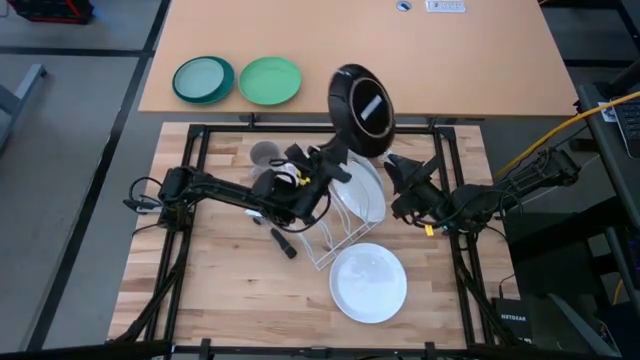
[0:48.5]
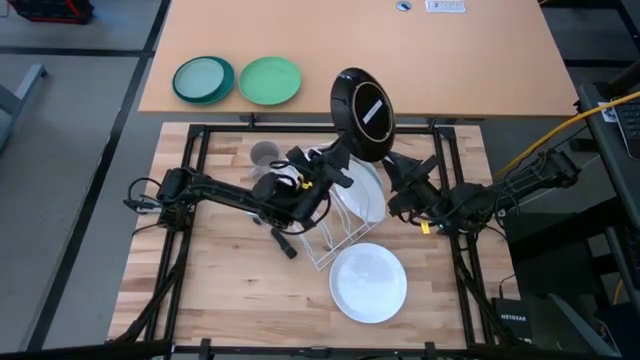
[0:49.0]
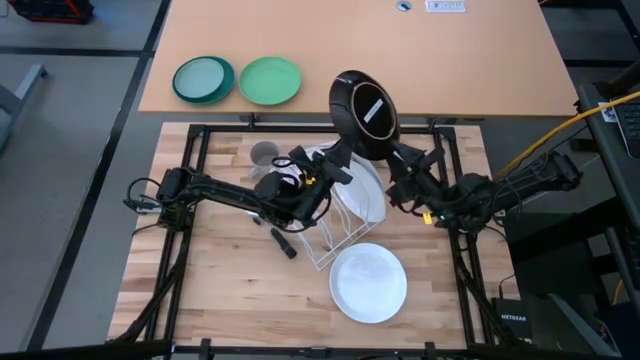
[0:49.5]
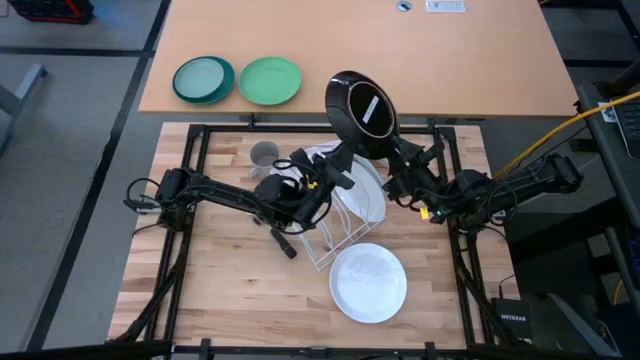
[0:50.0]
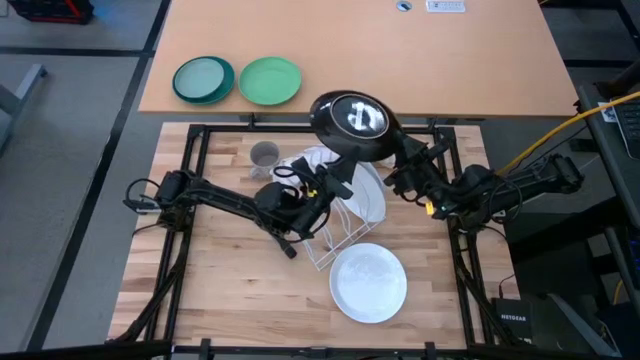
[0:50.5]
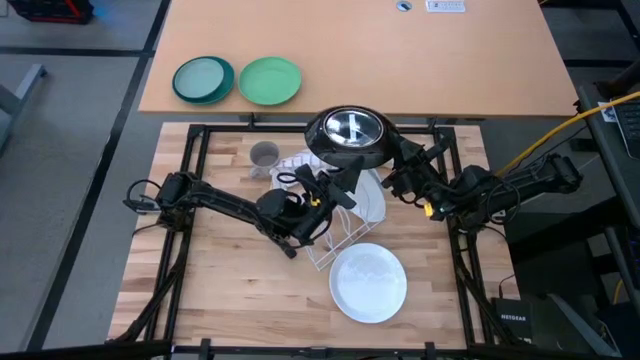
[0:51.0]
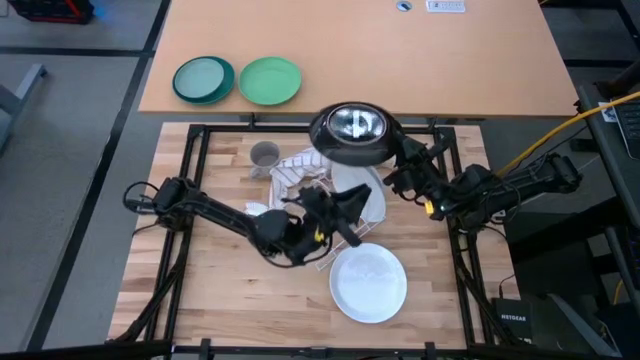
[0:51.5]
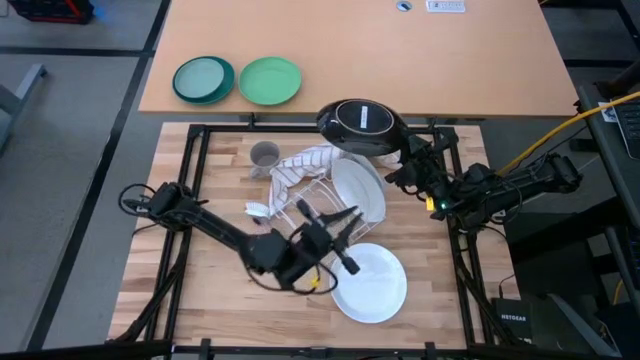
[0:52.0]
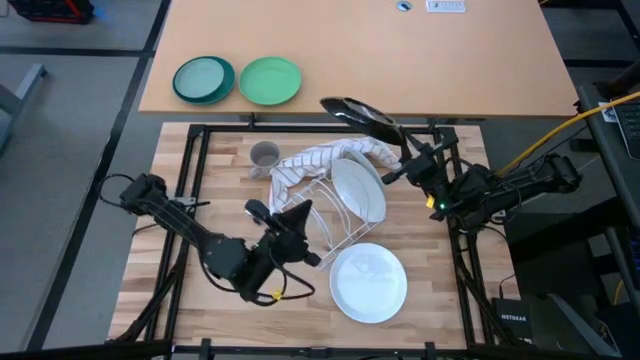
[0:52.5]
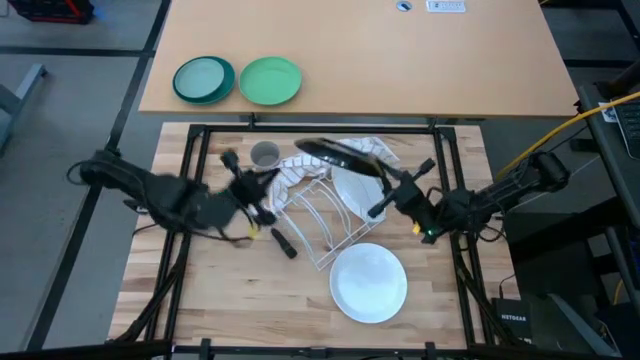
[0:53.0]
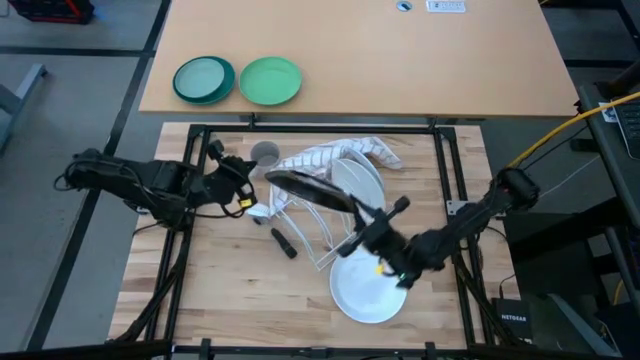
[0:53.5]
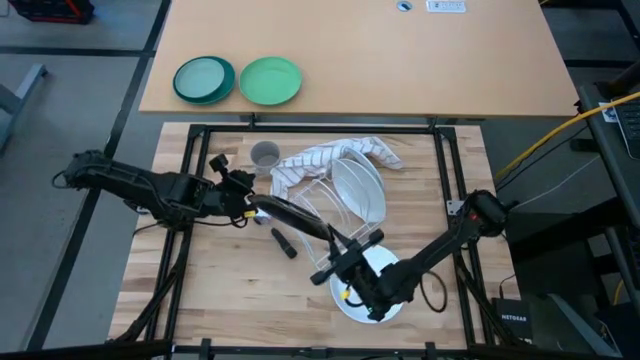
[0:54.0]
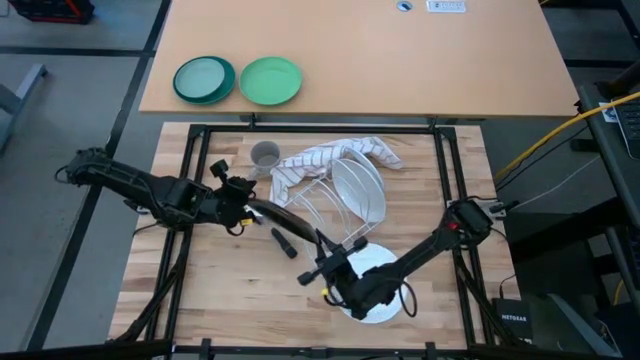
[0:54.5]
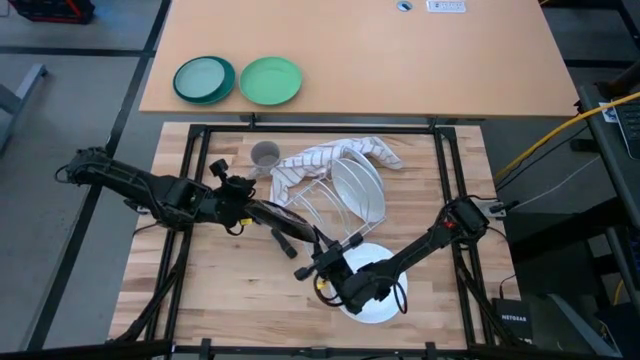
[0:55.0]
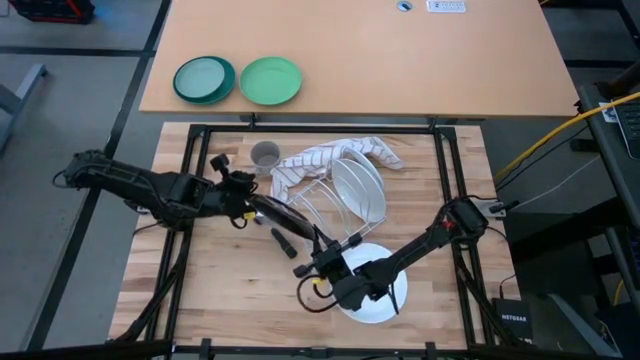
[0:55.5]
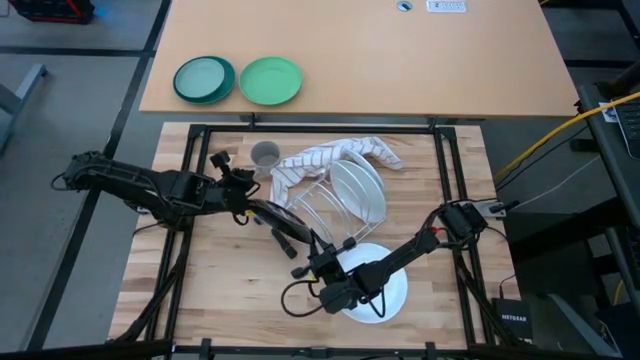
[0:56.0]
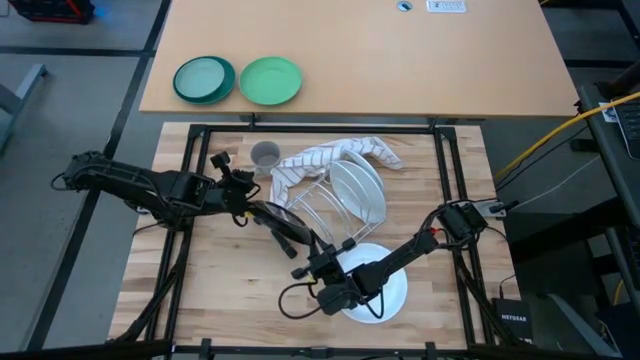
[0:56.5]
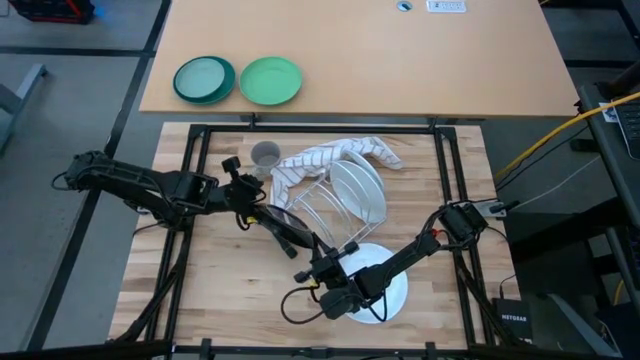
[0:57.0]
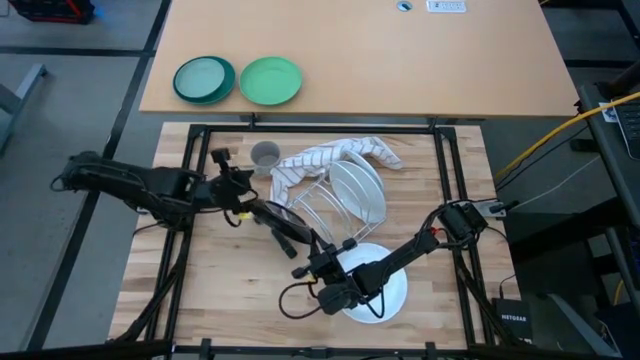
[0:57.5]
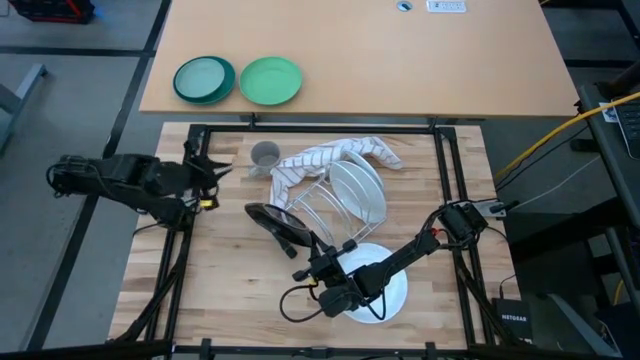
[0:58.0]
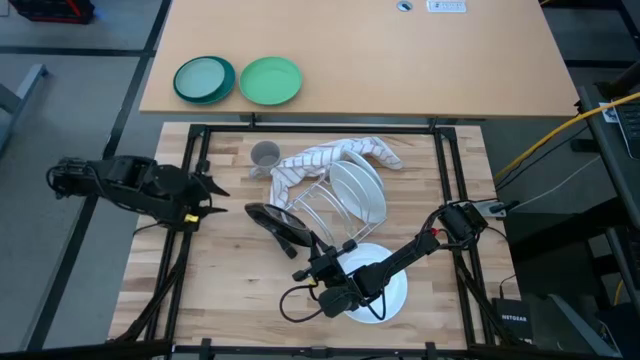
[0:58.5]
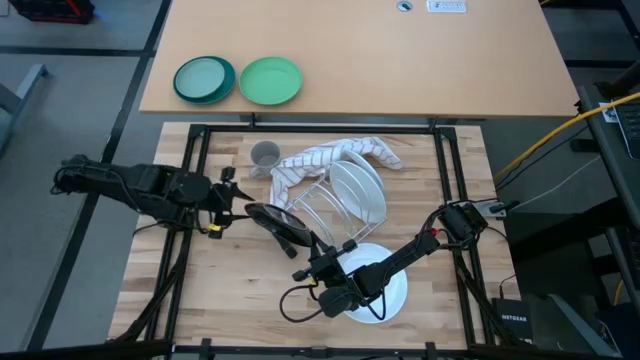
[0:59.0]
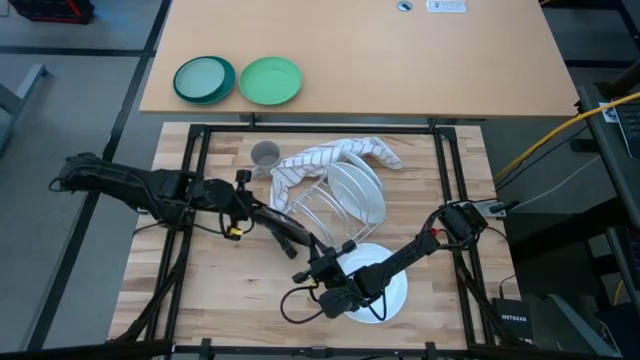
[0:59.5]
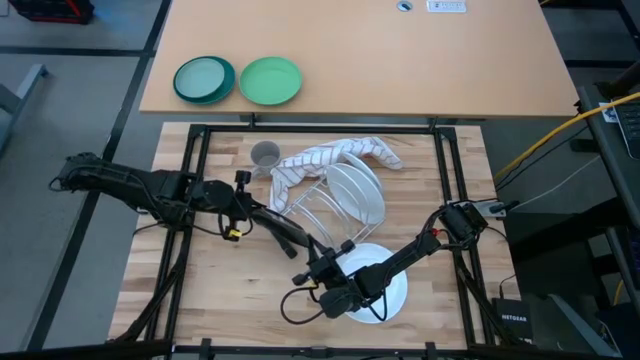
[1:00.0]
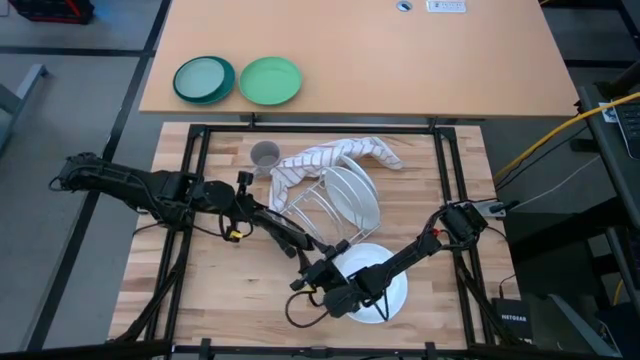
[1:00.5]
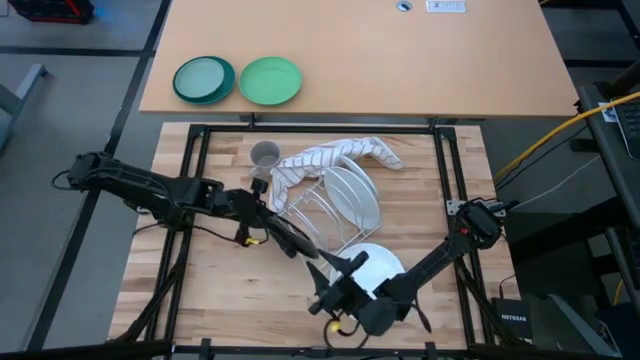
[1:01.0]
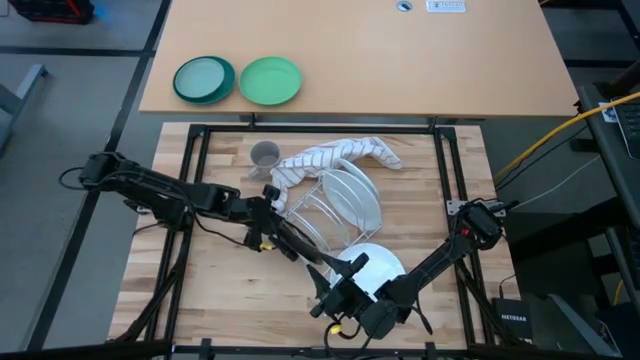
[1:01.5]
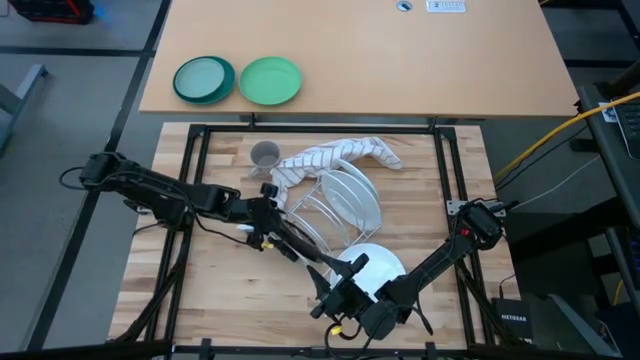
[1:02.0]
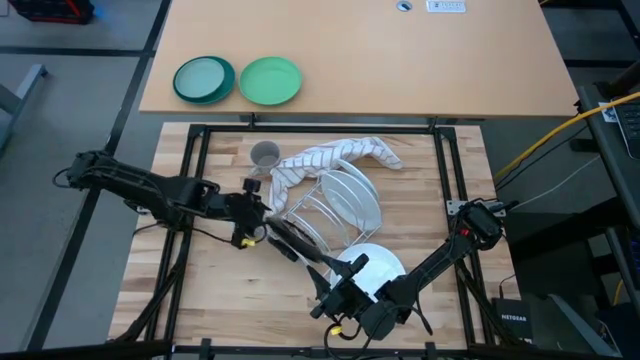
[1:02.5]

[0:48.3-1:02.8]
Task: Sort dishes
Put the red patterned plate in the dish rack

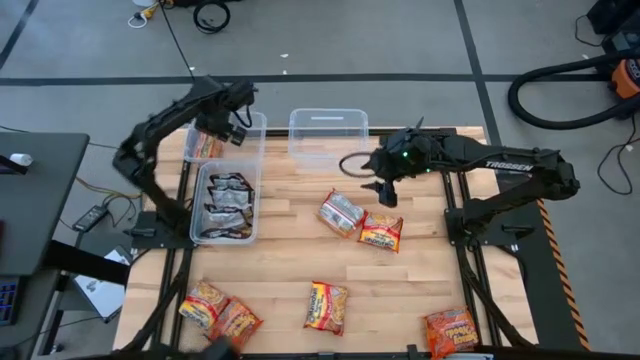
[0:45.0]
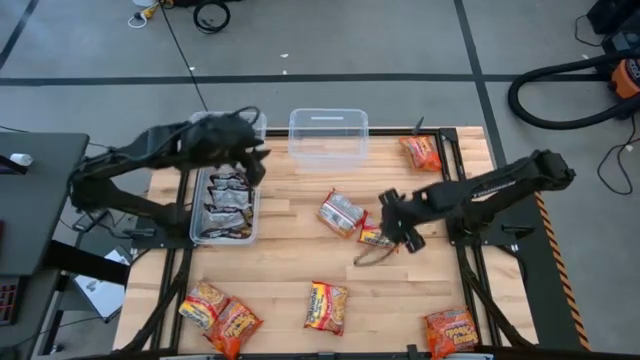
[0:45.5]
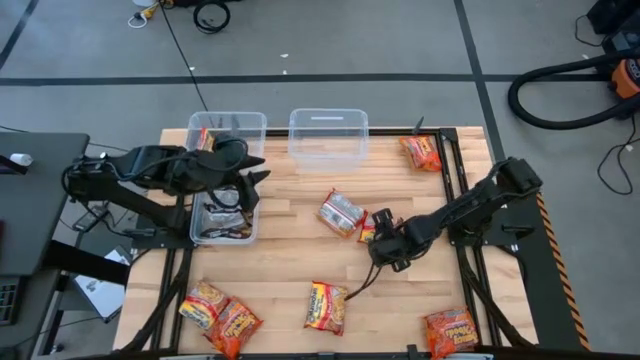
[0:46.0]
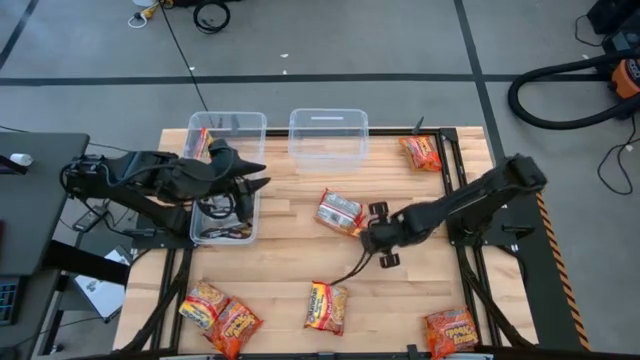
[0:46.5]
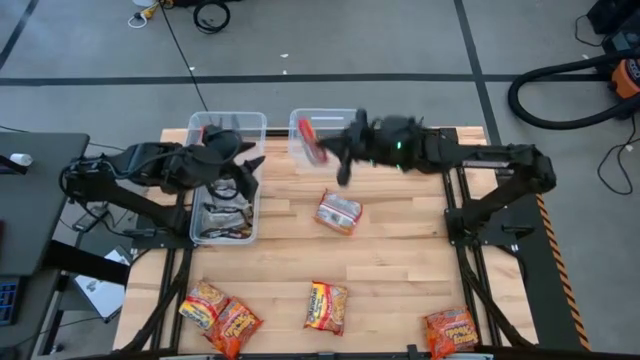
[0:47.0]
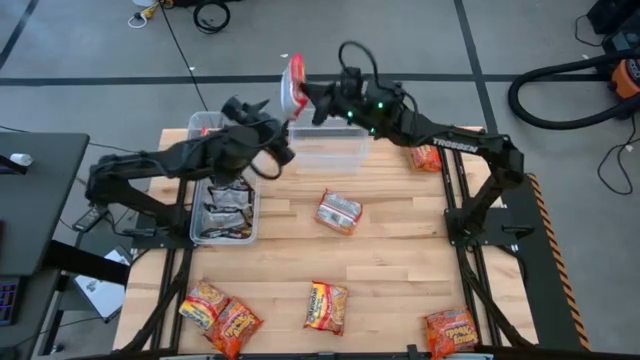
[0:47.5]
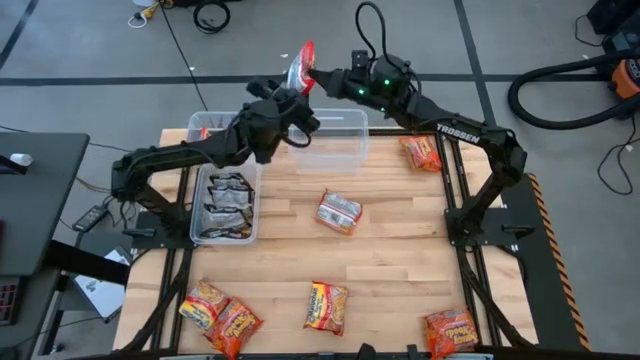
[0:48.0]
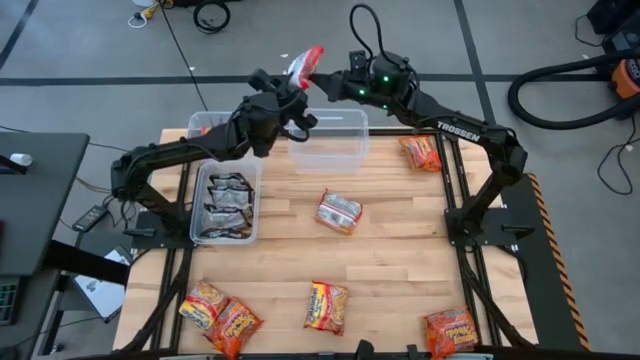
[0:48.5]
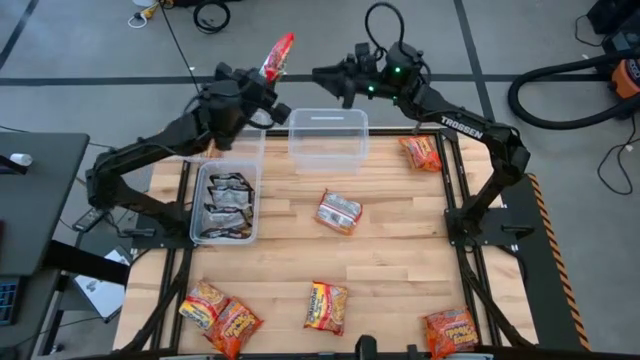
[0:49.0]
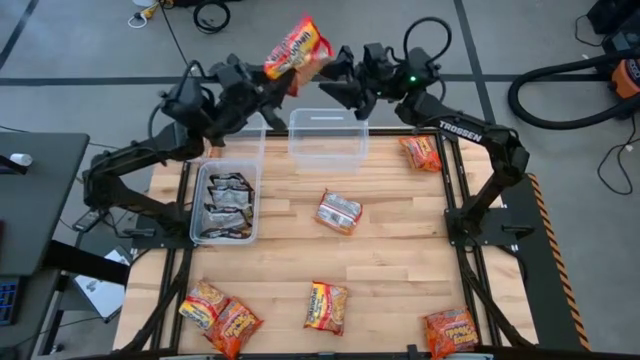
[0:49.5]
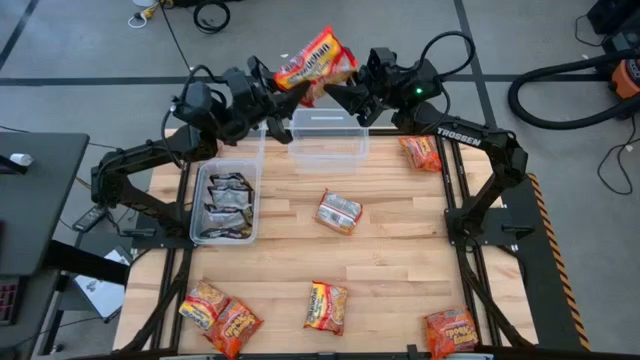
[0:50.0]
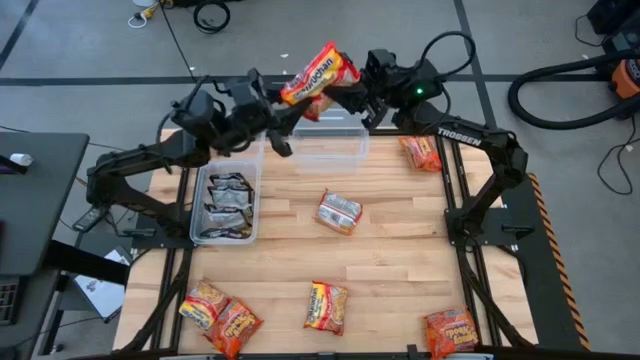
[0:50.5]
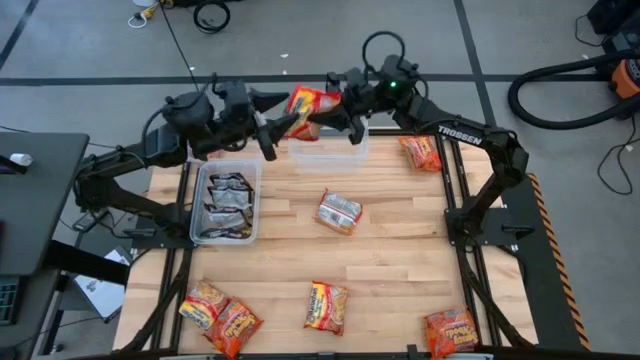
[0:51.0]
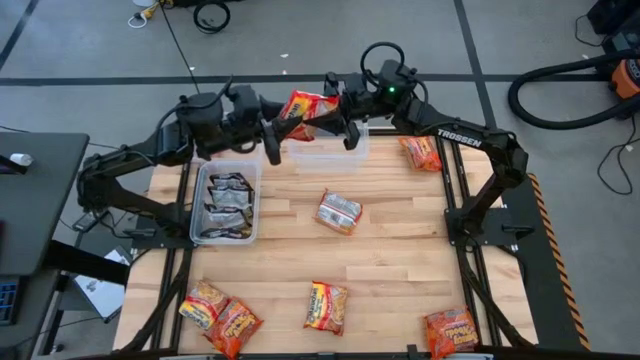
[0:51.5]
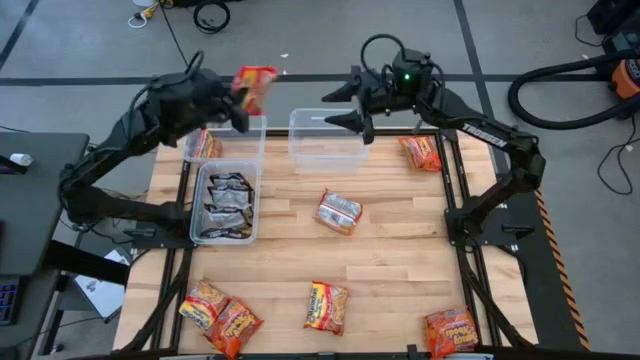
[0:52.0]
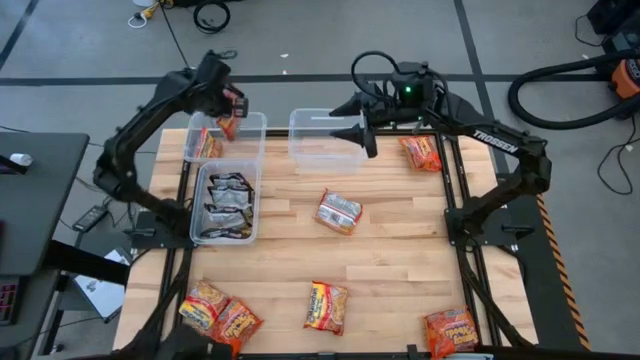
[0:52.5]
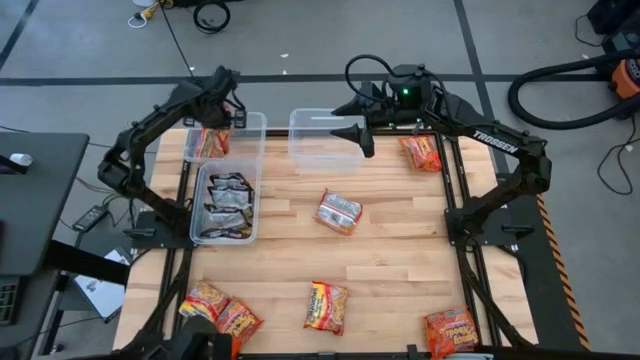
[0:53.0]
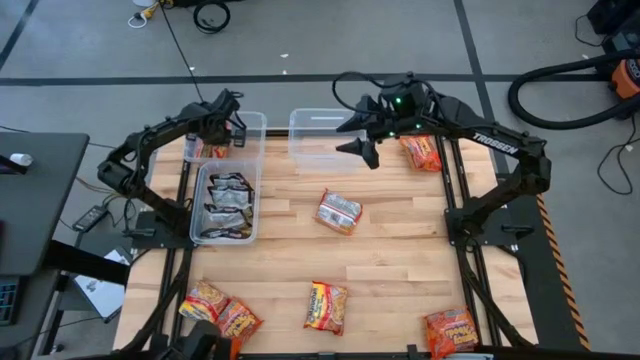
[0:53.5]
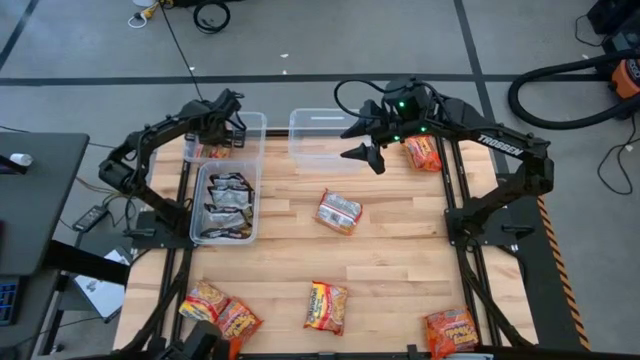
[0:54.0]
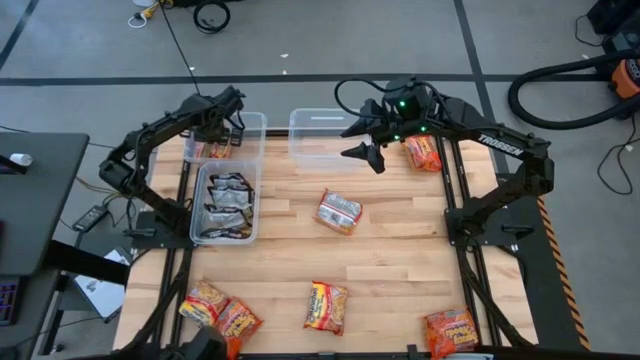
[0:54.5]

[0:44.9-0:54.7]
Task: Sort Maruchan noodles
Put the center red noodle pack into the top left transparent bin
